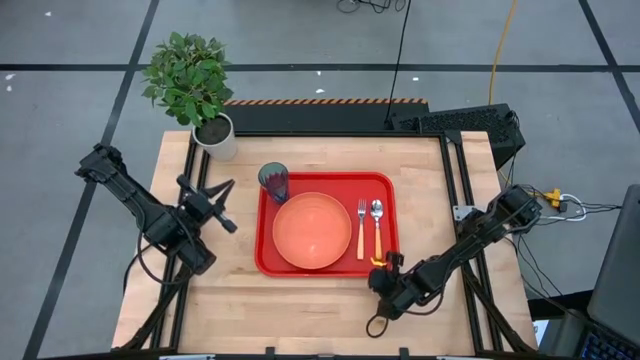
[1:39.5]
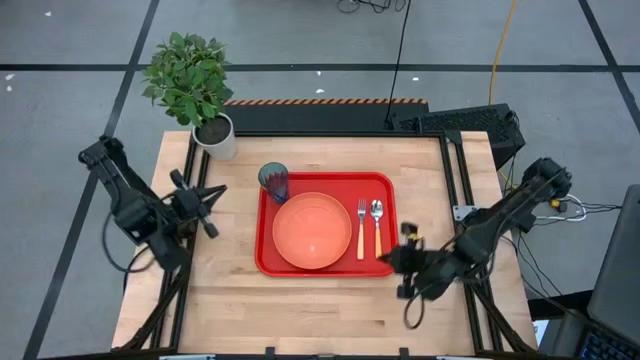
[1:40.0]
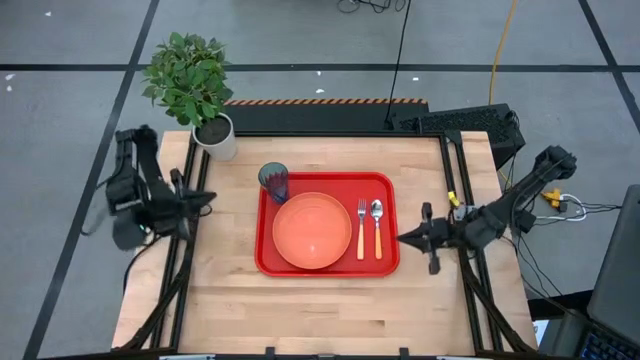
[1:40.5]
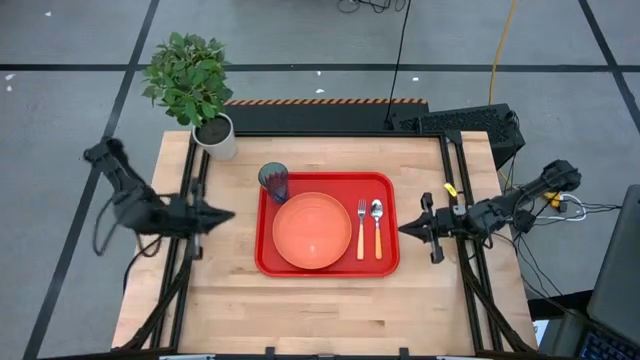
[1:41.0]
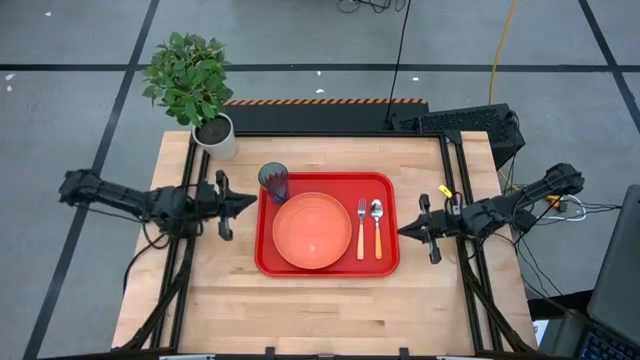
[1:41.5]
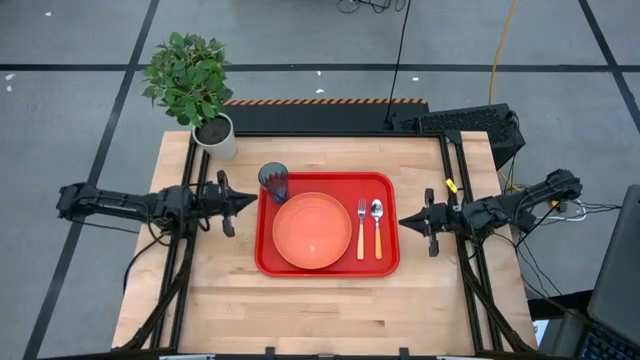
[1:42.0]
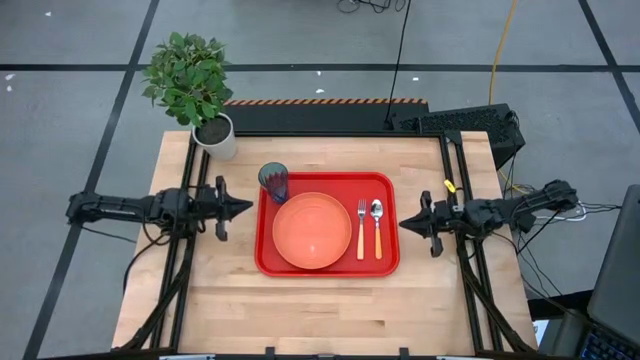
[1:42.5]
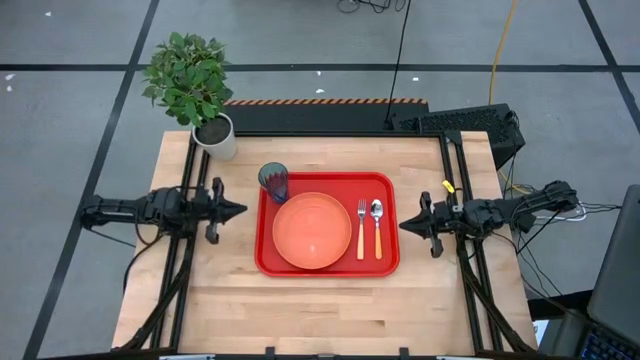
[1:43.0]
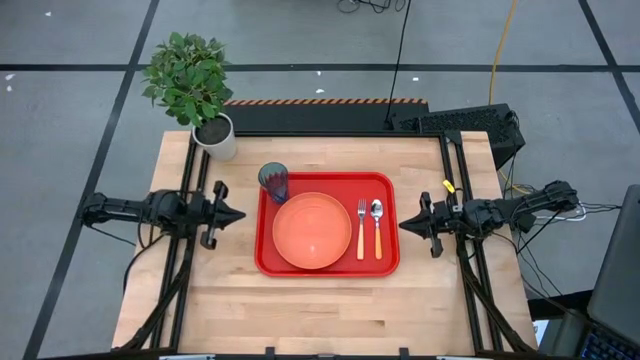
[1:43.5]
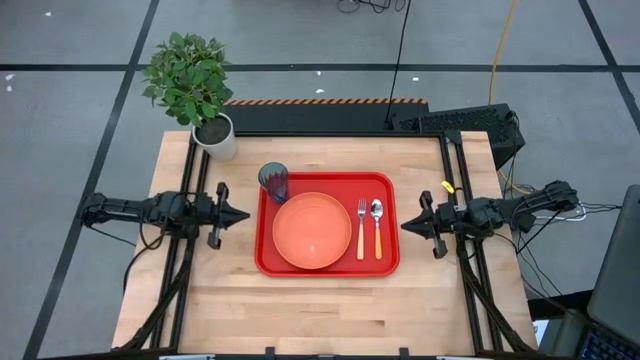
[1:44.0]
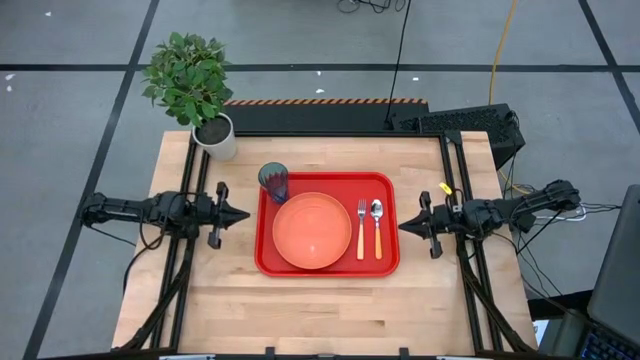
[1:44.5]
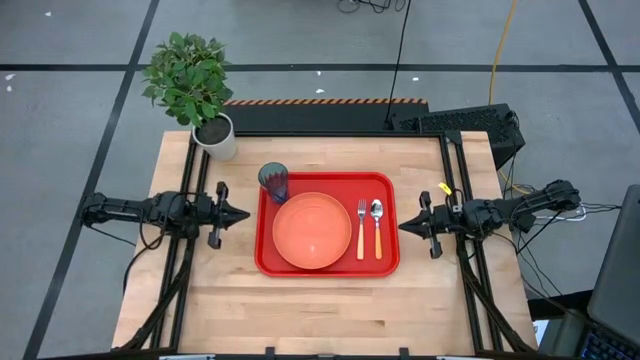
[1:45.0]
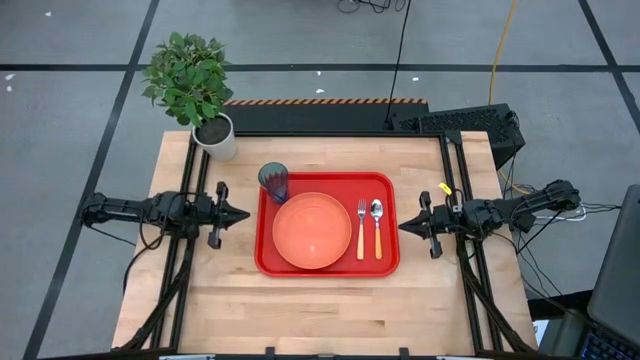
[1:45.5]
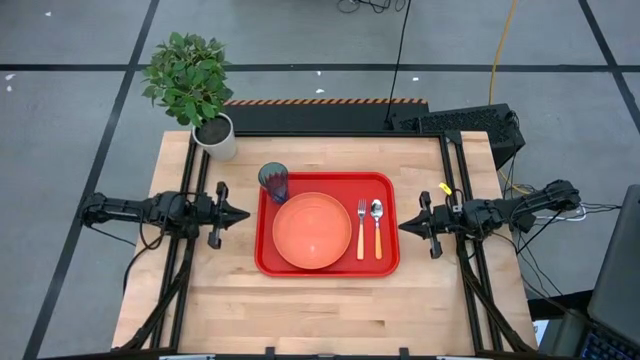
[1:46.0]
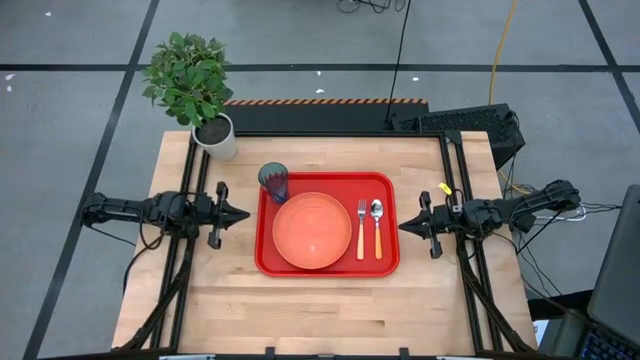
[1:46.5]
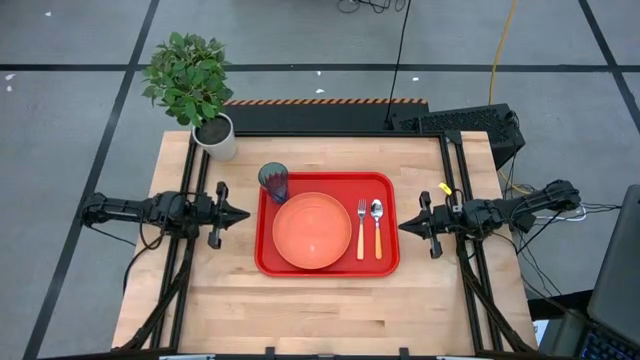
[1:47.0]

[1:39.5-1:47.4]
Task: Pick and place plate/cup/fork/spoon on tray
Return to Home Position

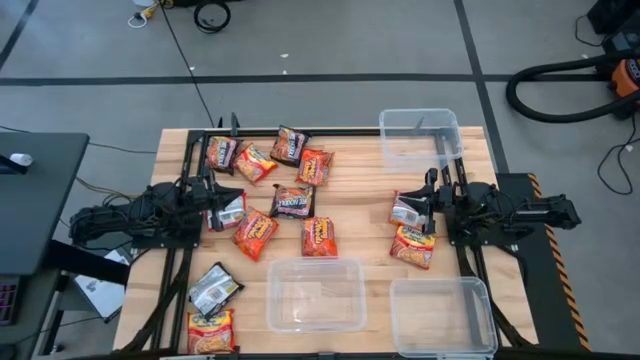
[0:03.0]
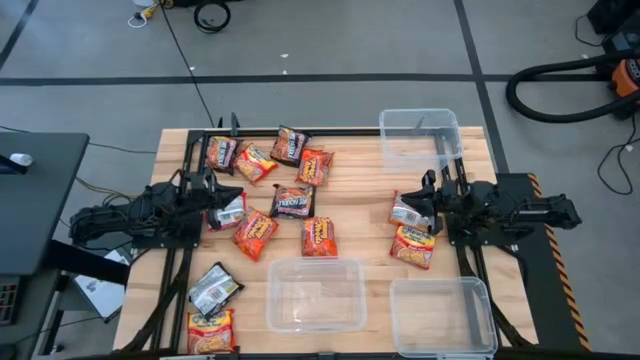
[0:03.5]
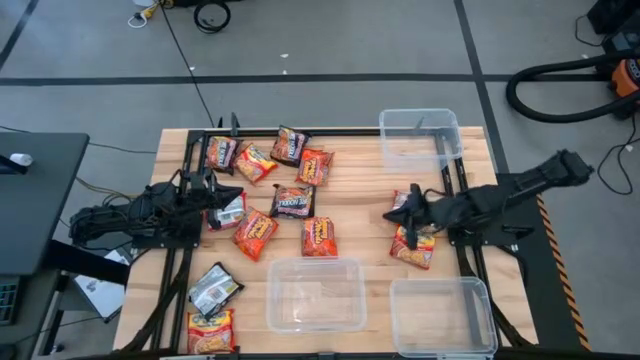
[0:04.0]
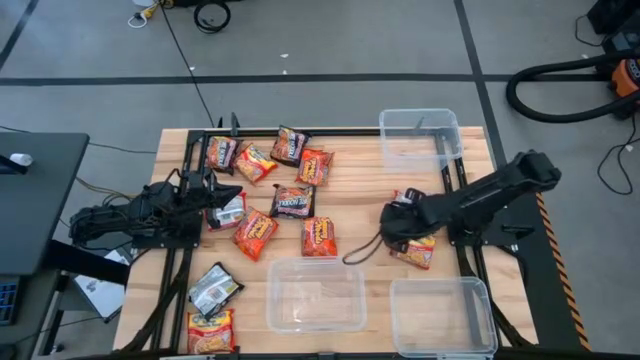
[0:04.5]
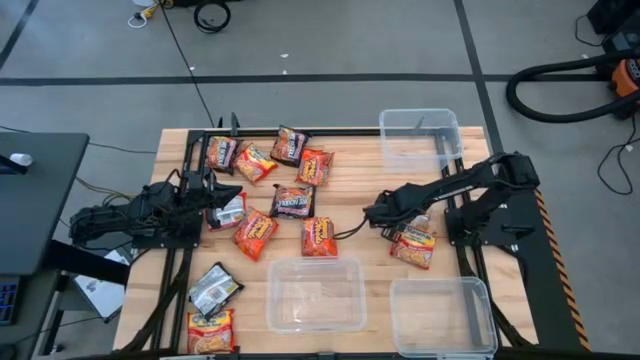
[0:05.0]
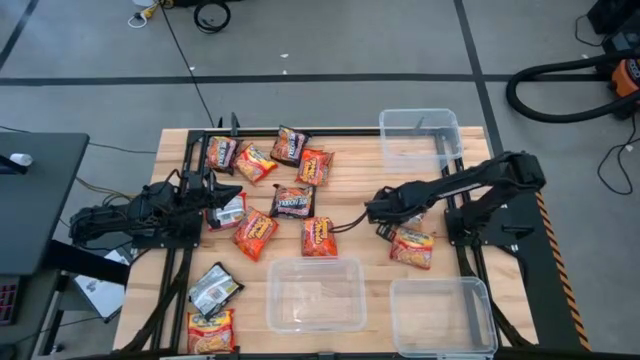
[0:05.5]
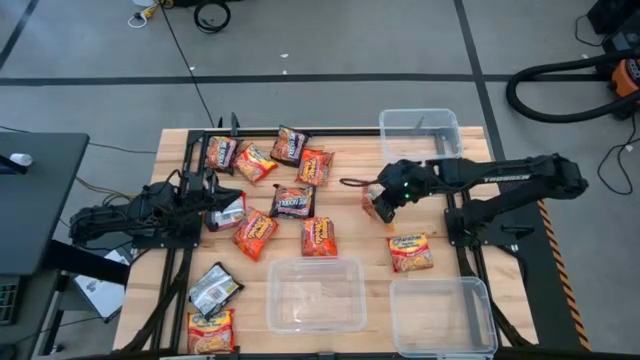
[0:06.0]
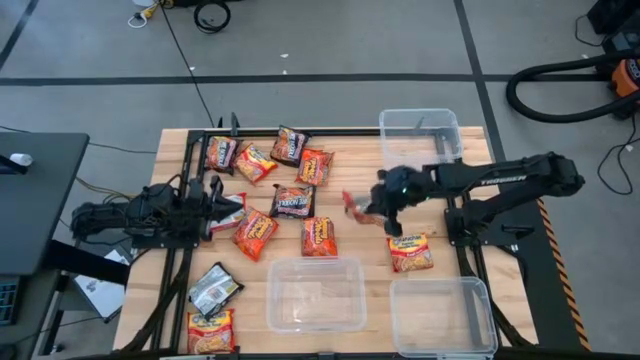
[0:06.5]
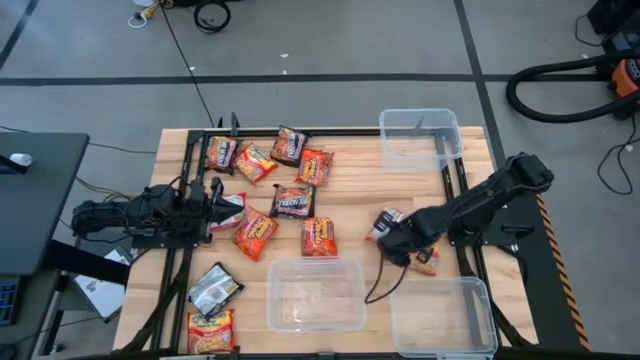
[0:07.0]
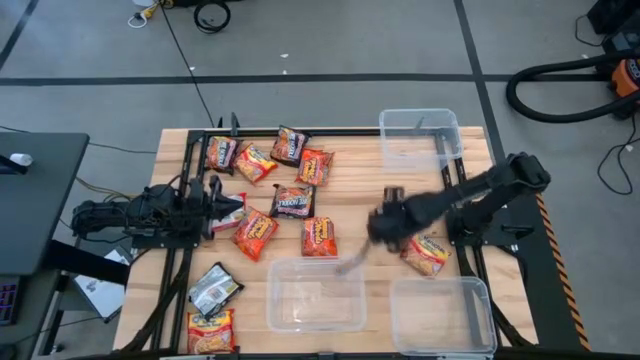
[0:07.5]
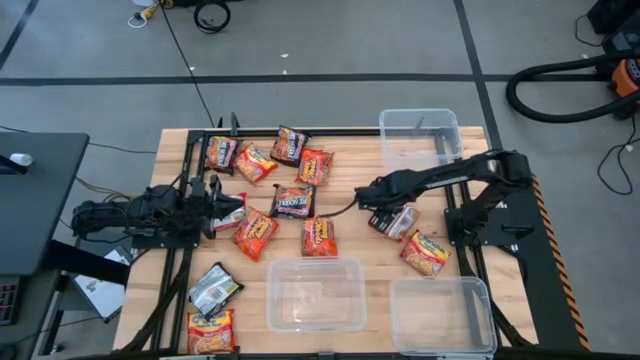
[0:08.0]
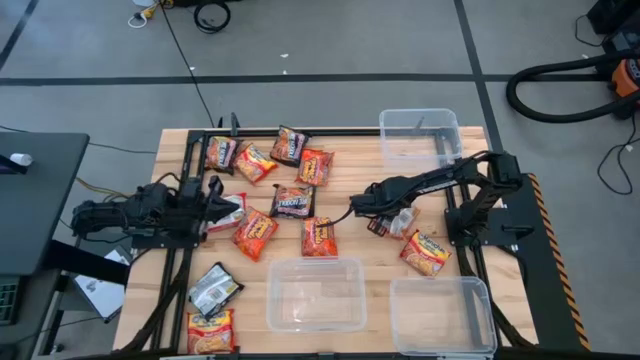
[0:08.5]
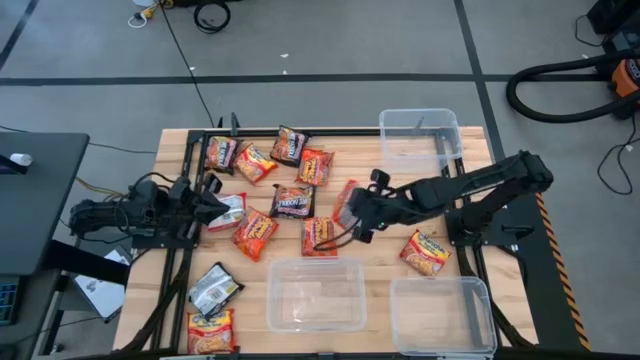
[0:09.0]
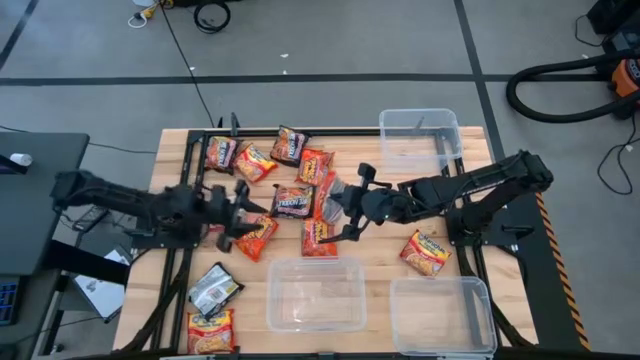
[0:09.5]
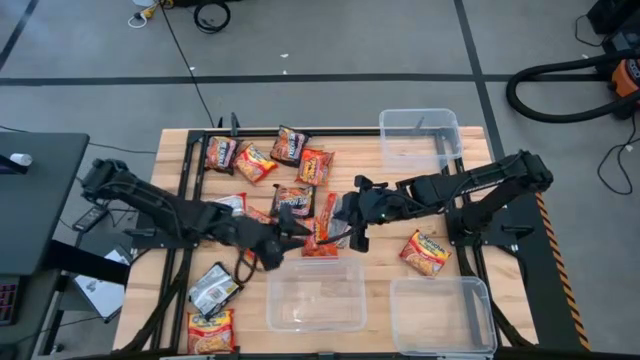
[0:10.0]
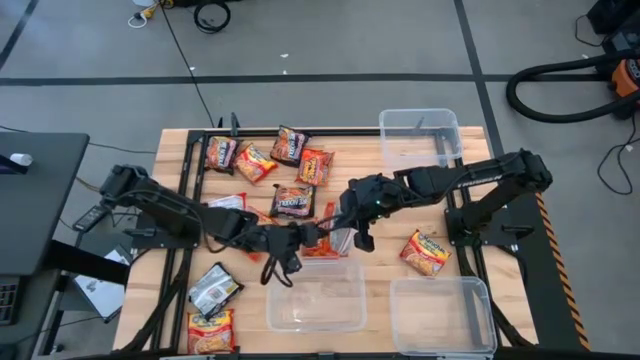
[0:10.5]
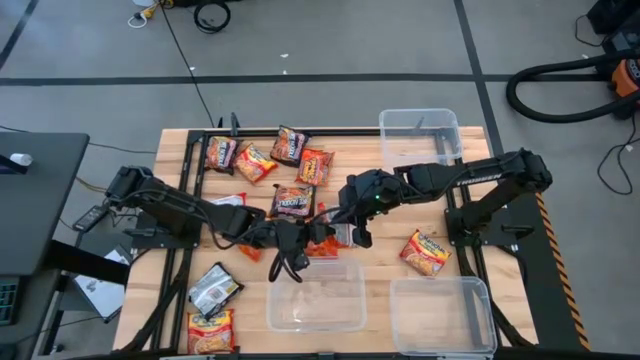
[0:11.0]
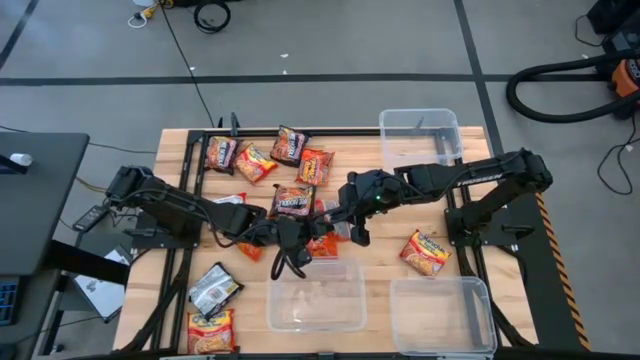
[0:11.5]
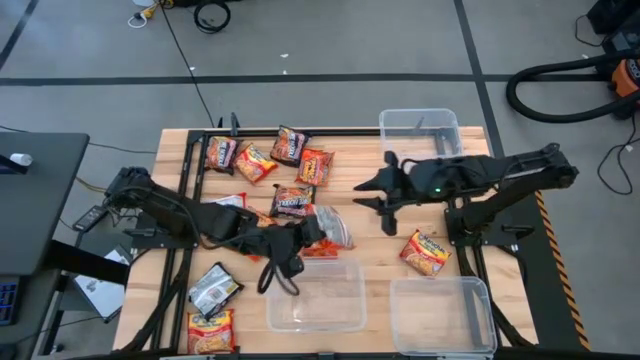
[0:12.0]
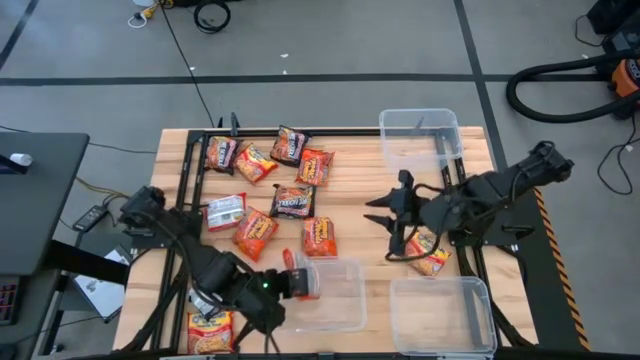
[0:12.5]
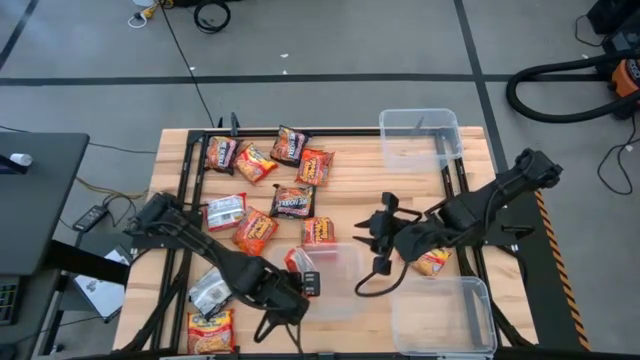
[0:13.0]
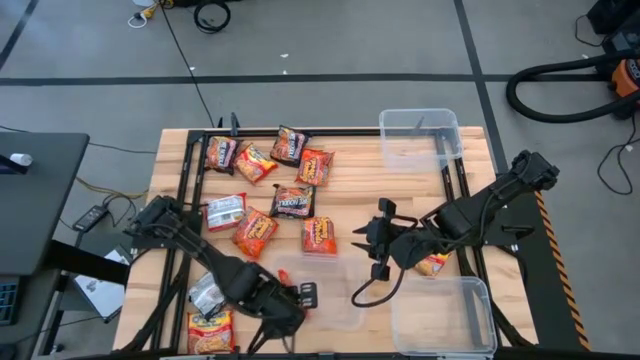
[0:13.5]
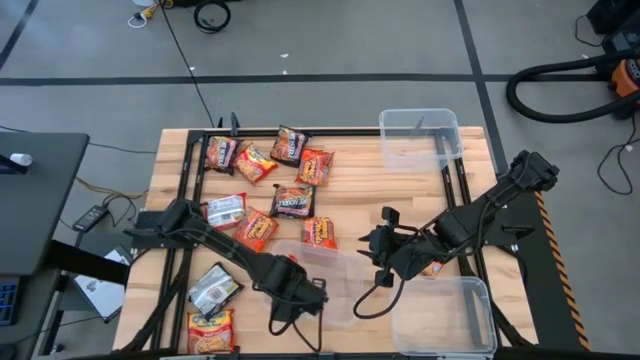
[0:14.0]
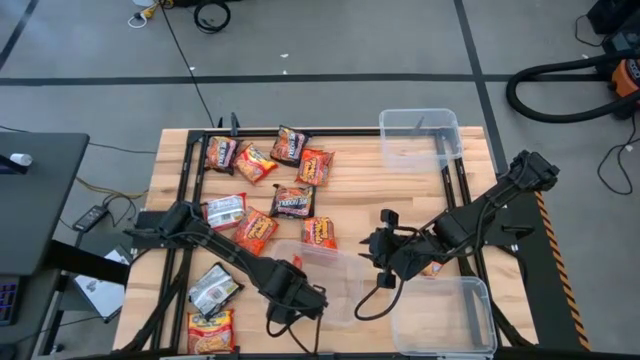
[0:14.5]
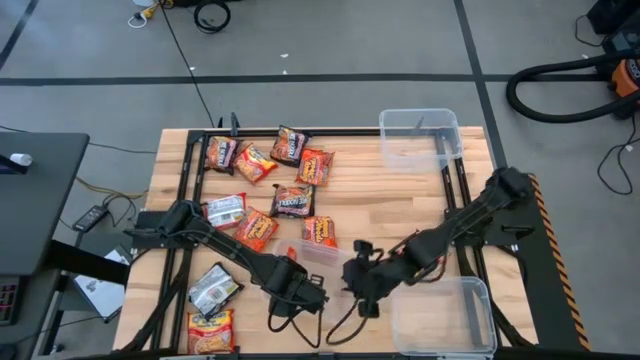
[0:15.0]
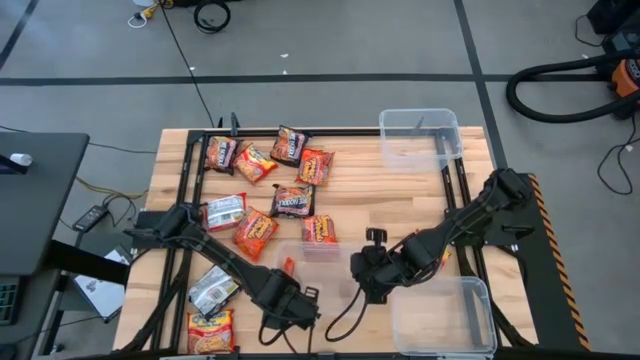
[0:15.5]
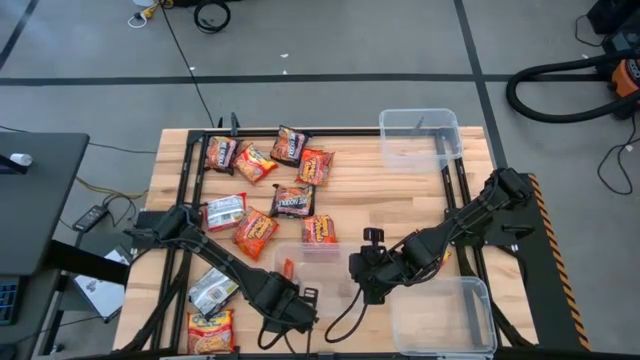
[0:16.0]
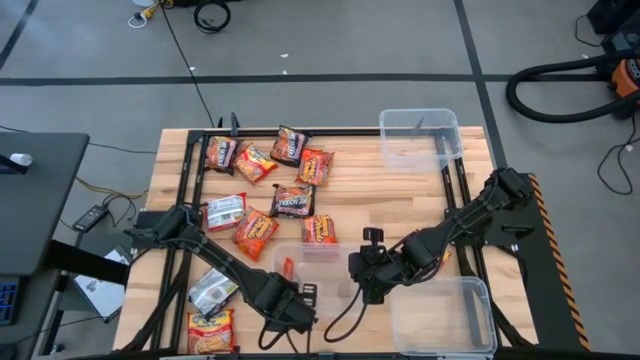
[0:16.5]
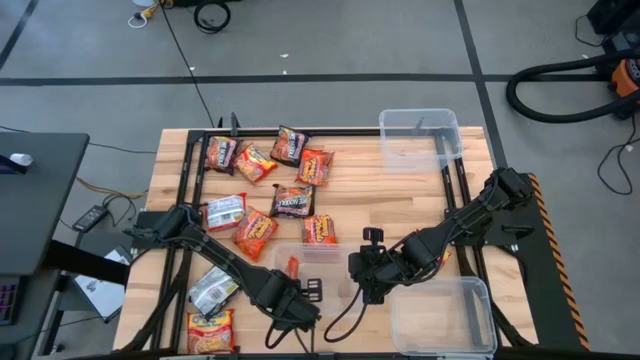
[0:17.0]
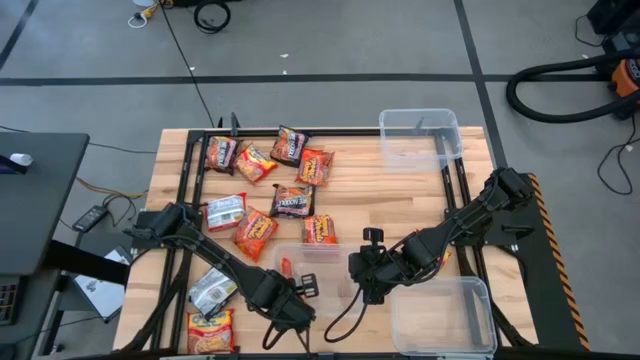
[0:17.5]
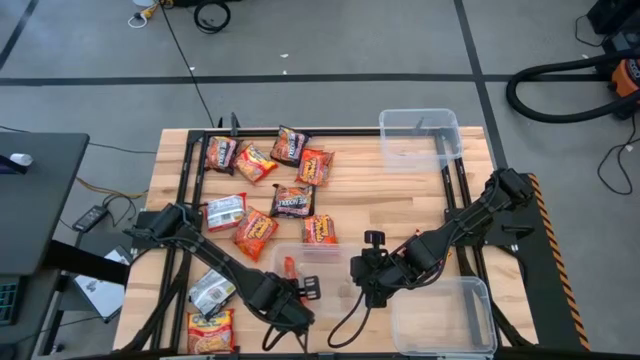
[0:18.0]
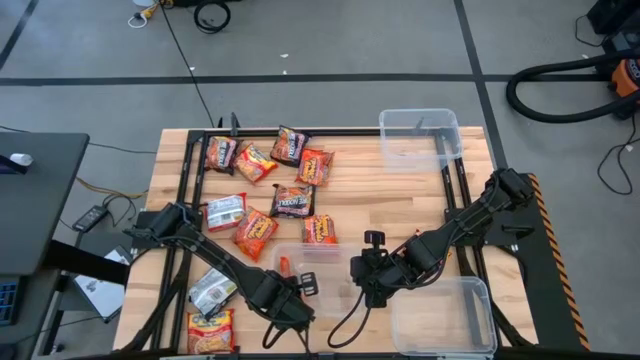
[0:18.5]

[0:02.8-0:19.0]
Task: Sort Maruchan noodles
Put the orange noodle pack into the bottom left transparent bin
